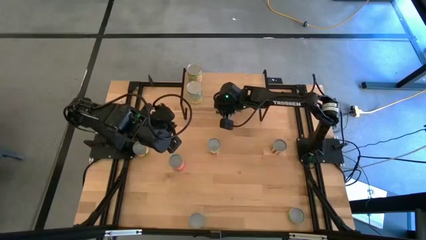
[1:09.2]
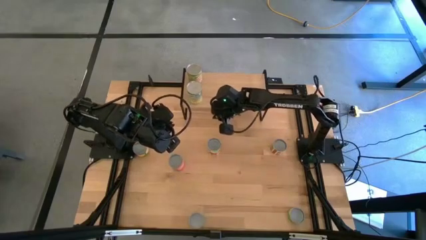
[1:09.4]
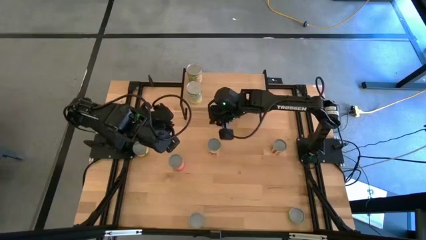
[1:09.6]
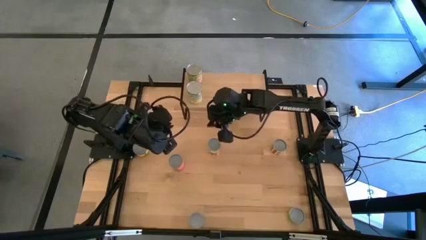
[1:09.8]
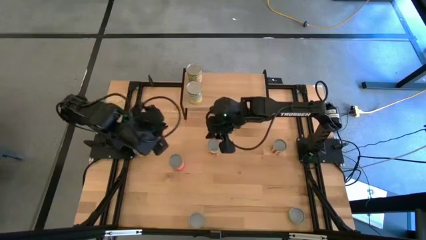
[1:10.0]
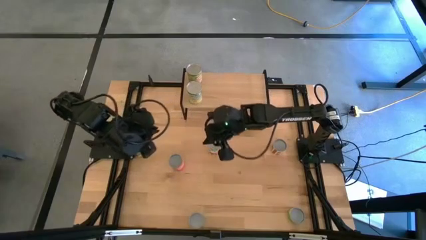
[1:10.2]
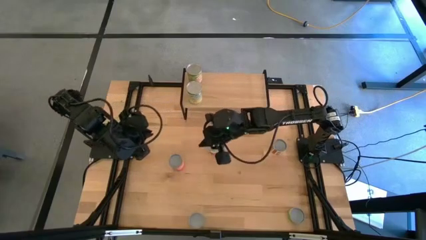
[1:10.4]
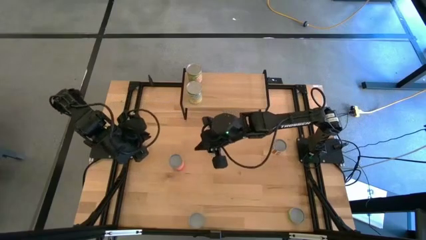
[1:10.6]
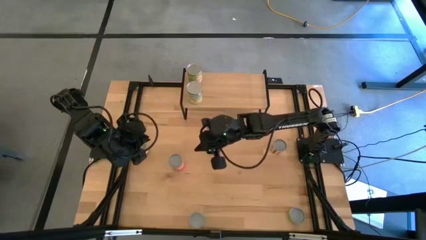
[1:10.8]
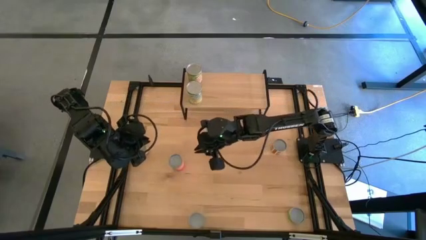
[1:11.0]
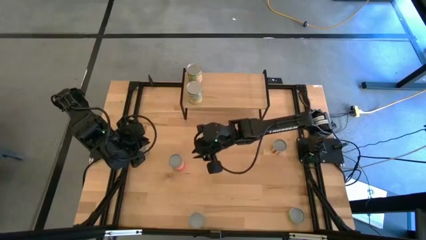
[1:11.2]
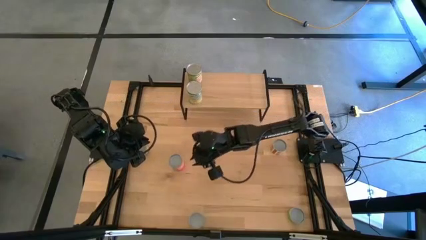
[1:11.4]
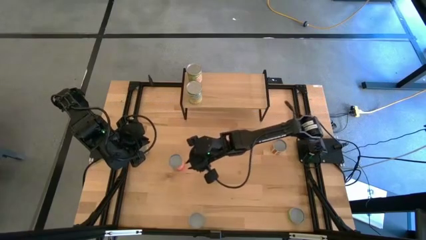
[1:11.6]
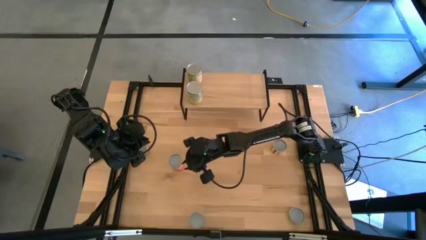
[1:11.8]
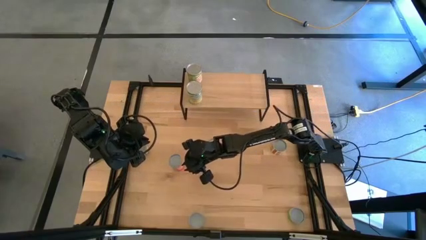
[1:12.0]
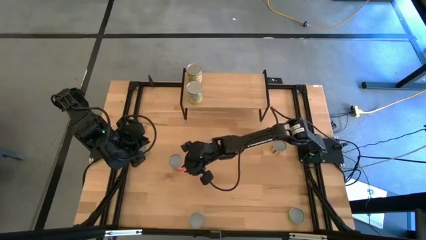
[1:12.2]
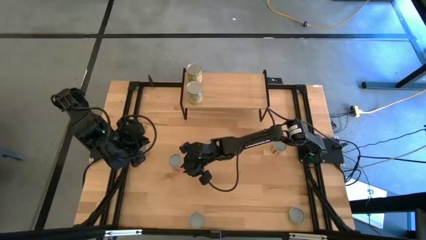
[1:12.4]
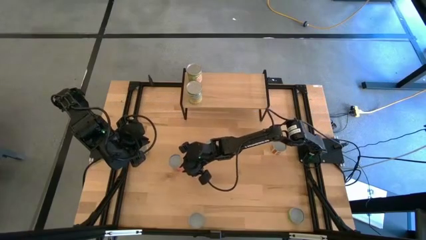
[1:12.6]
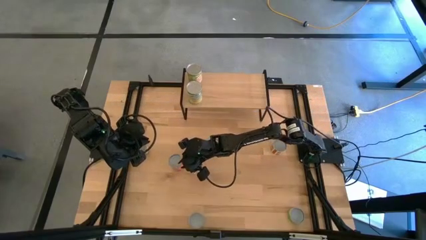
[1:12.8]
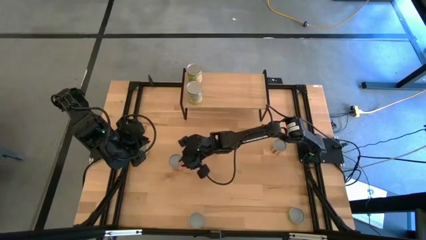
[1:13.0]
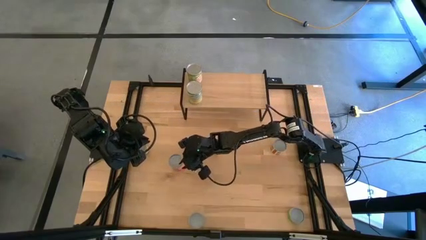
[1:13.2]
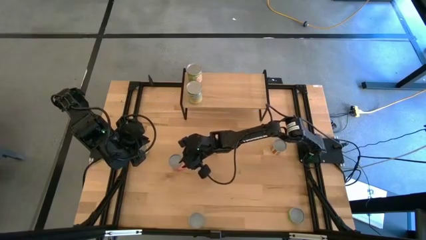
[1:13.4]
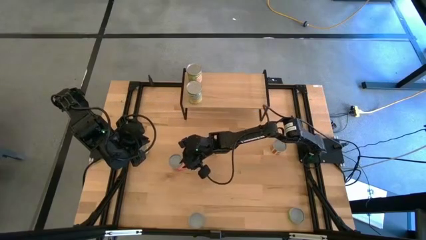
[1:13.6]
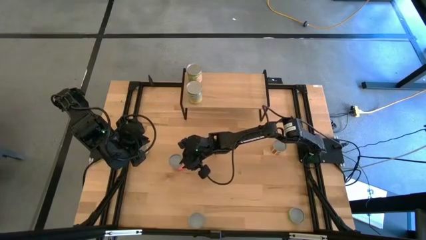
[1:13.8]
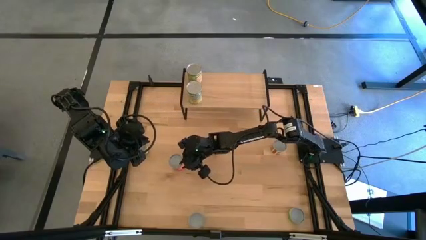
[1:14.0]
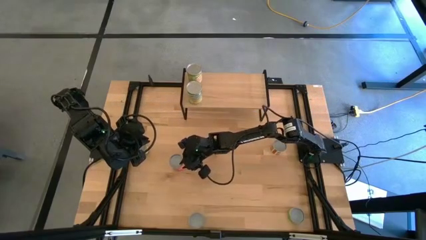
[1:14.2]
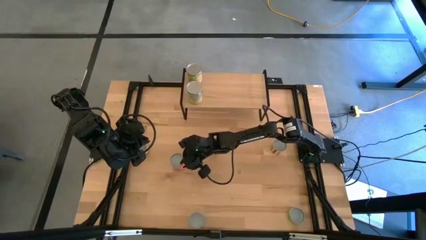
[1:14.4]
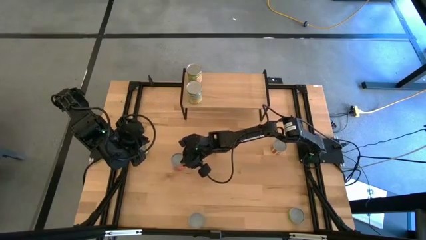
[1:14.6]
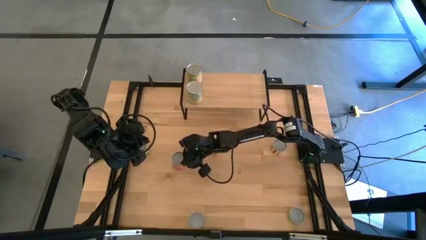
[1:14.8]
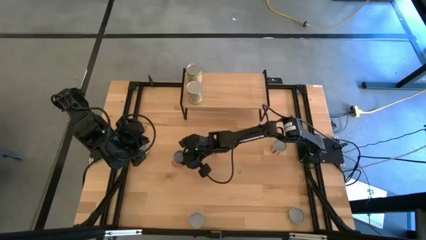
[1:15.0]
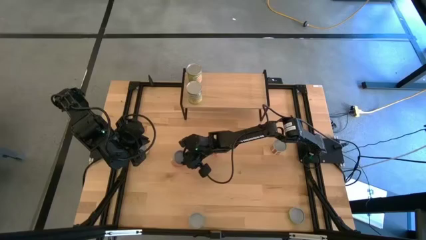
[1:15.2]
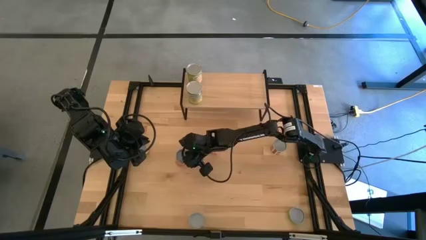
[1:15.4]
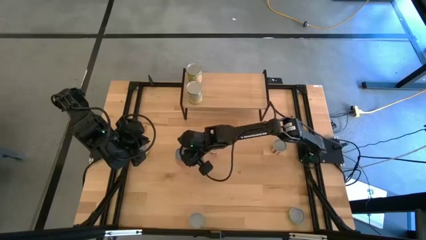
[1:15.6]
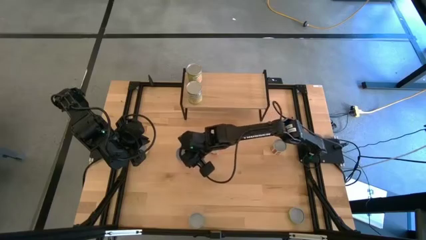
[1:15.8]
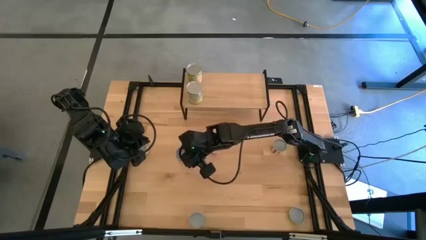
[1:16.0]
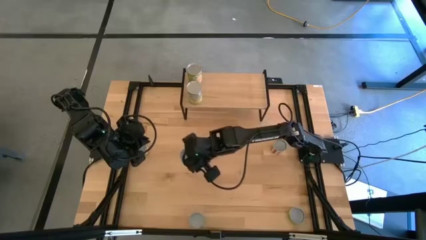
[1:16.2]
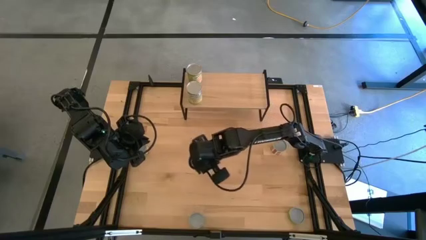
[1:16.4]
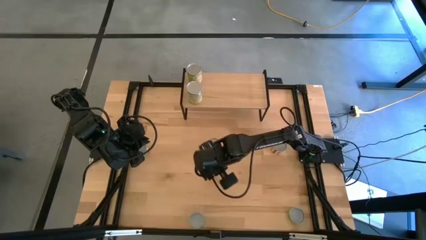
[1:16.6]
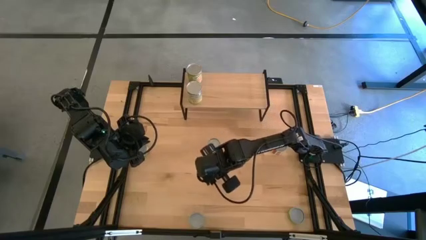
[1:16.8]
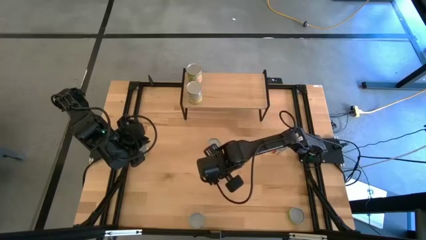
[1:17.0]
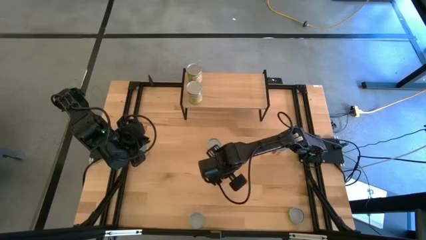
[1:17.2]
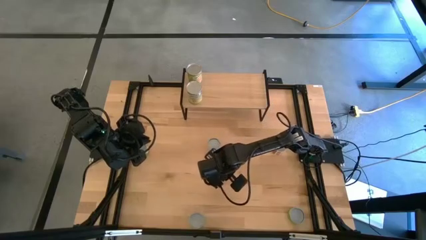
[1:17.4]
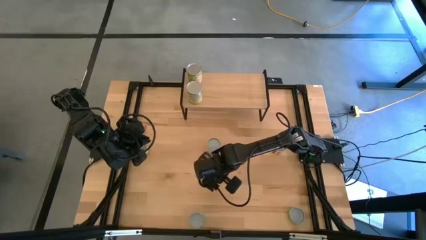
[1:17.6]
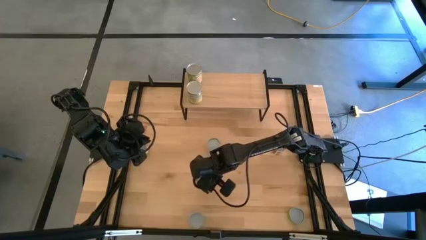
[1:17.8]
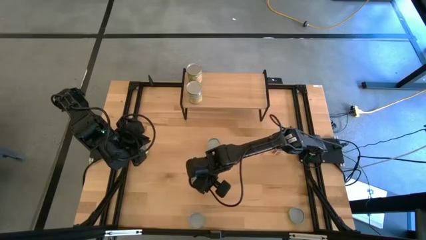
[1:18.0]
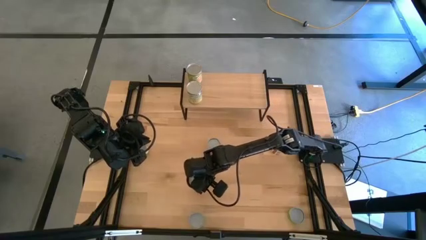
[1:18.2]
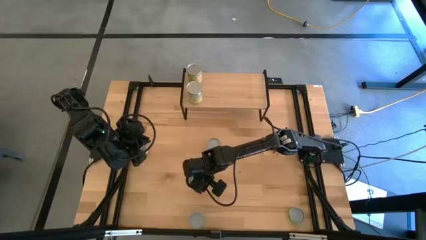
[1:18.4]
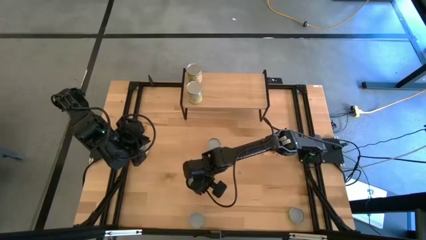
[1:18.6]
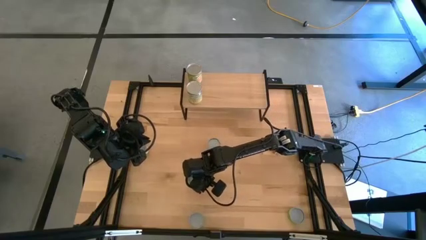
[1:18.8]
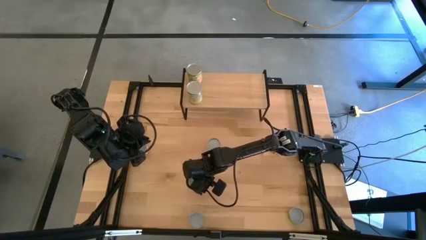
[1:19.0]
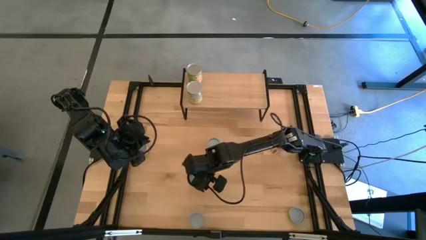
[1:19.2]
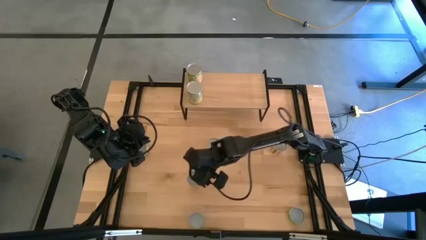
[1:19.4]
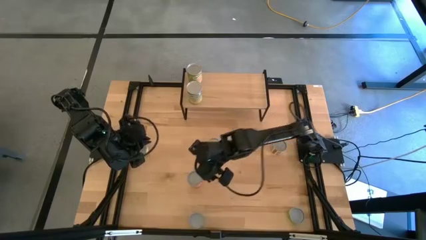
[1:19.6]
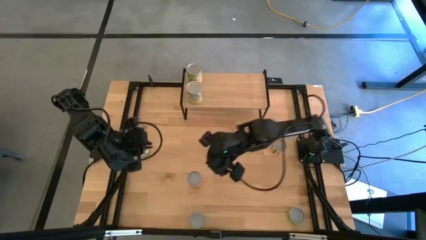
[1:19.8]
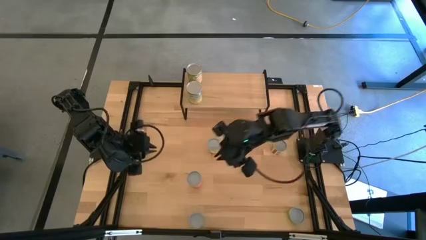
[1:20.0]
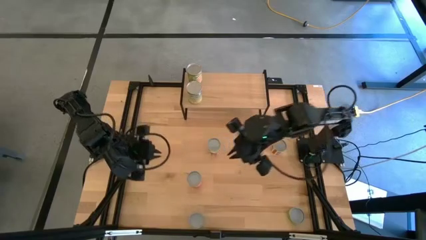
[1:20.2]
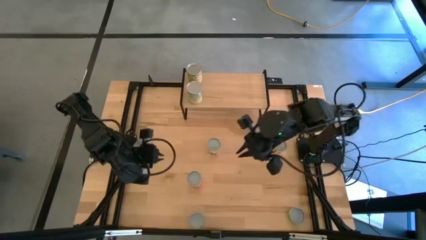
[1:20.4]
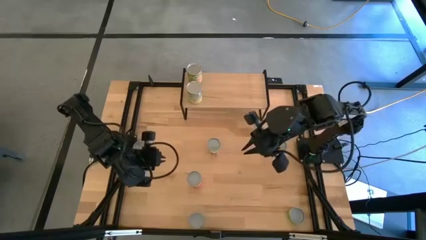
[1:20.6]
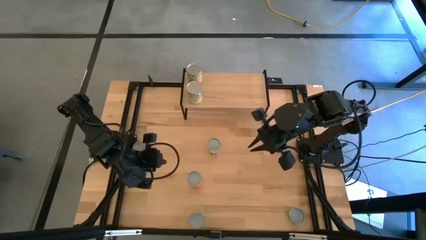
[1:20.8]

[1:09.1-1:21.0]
Task: Pick and place cans onto a shelf
Put the canned mixed fruits on the shelf
